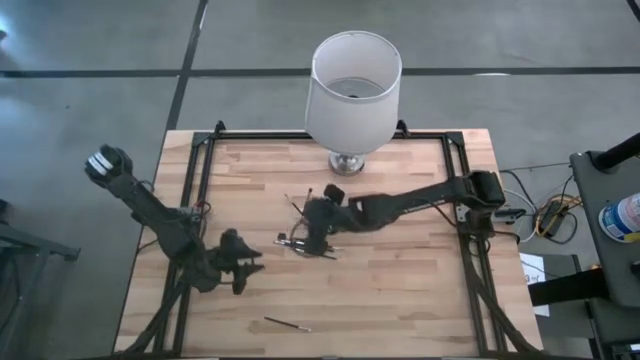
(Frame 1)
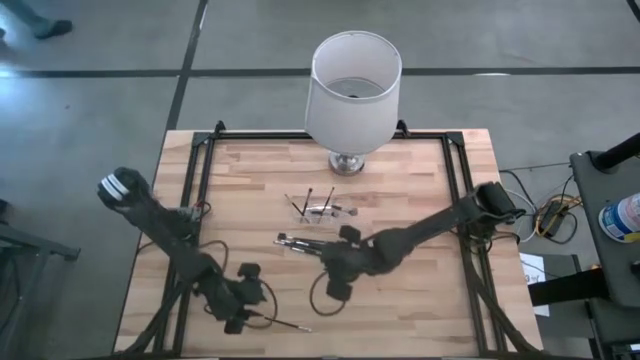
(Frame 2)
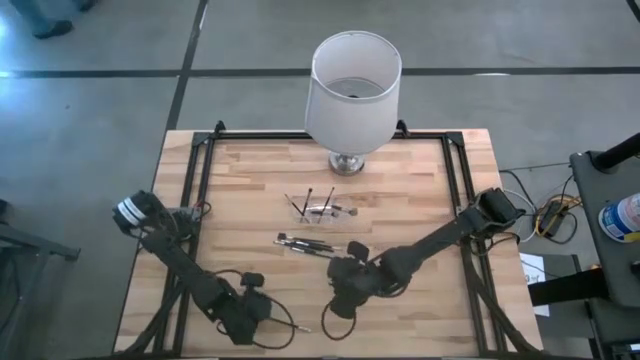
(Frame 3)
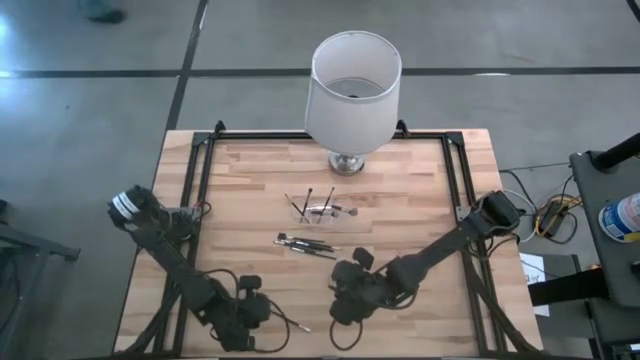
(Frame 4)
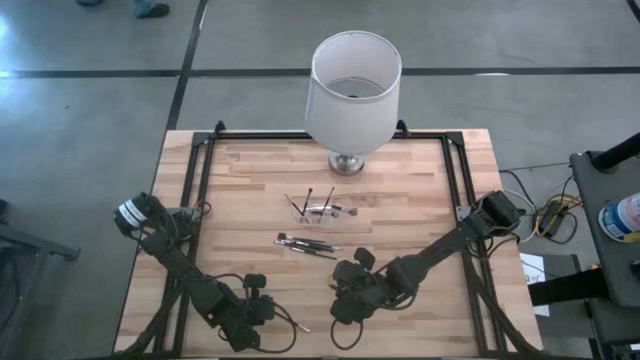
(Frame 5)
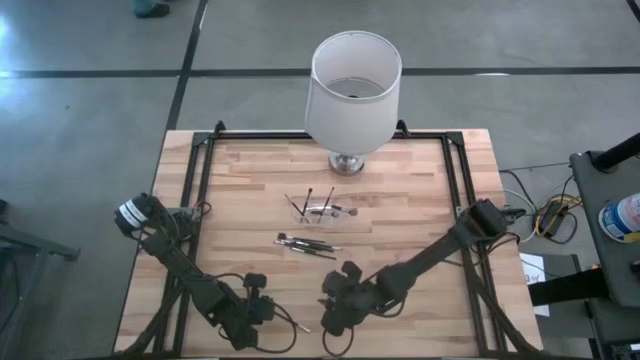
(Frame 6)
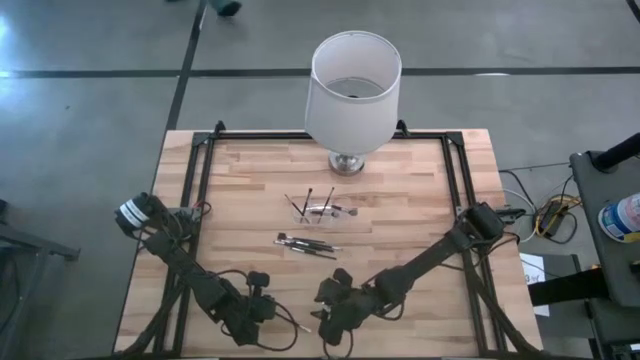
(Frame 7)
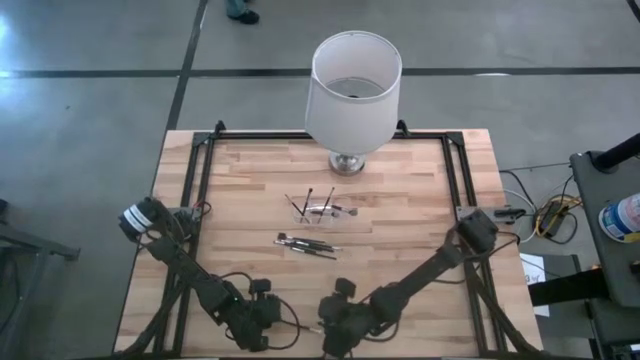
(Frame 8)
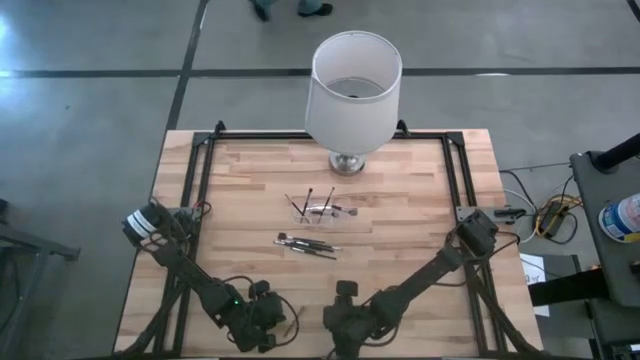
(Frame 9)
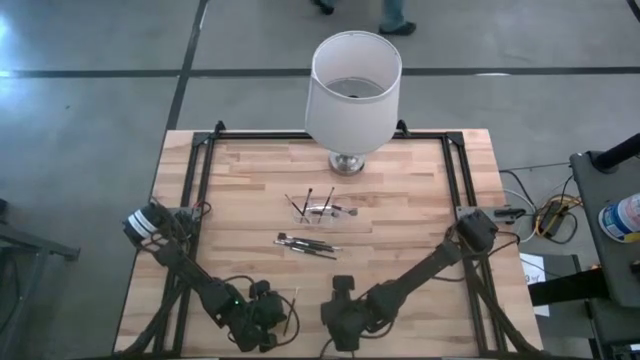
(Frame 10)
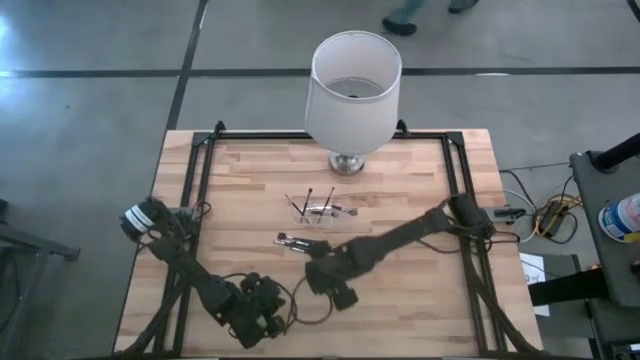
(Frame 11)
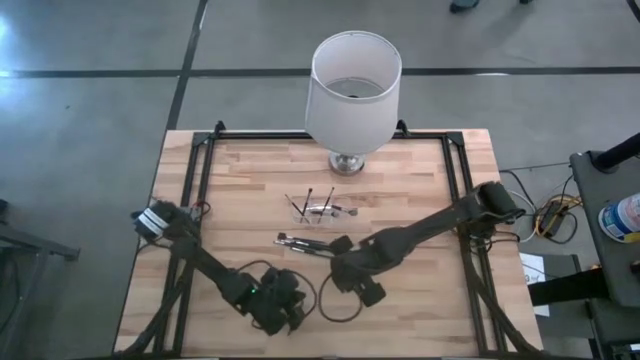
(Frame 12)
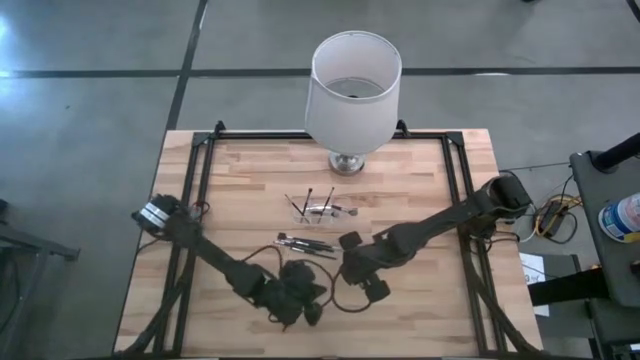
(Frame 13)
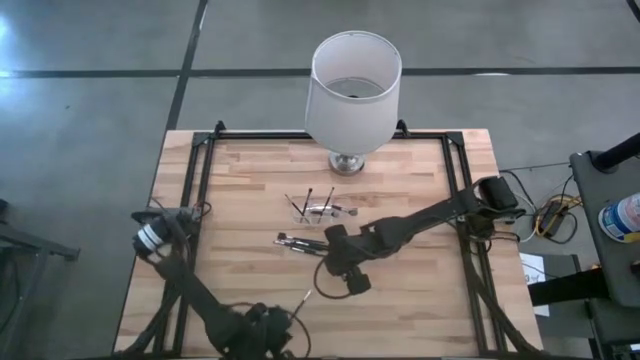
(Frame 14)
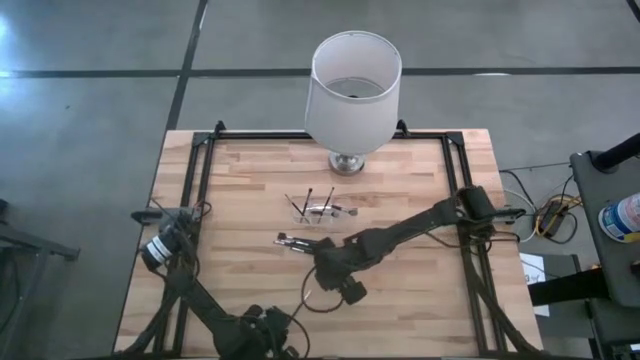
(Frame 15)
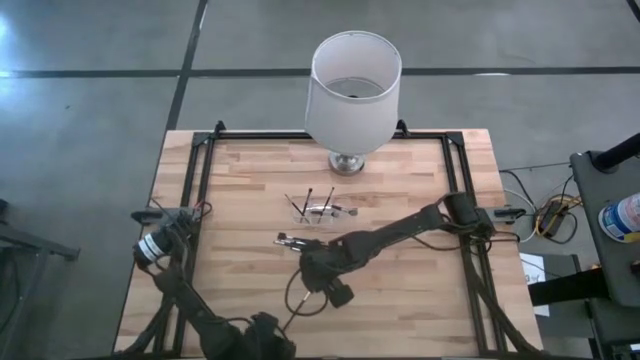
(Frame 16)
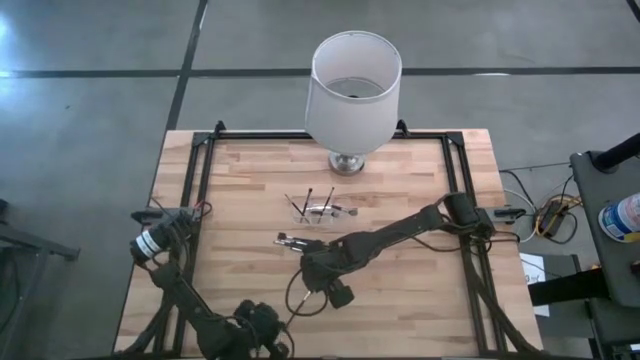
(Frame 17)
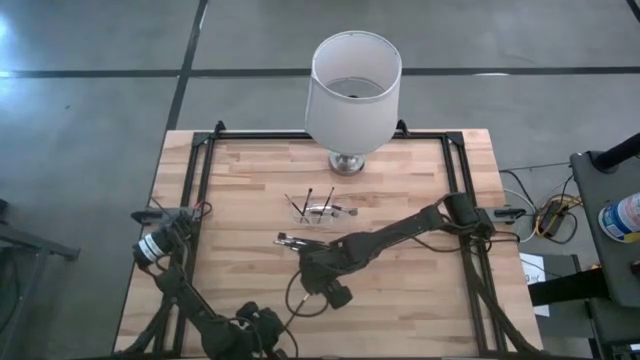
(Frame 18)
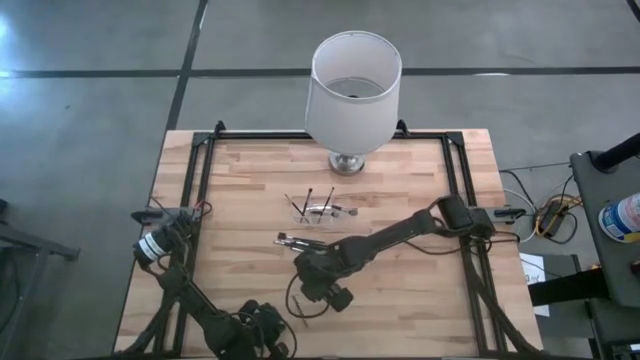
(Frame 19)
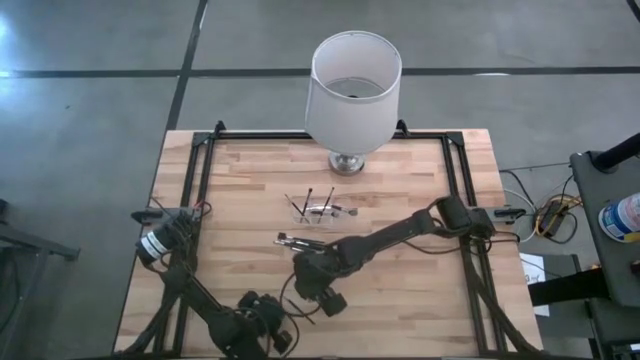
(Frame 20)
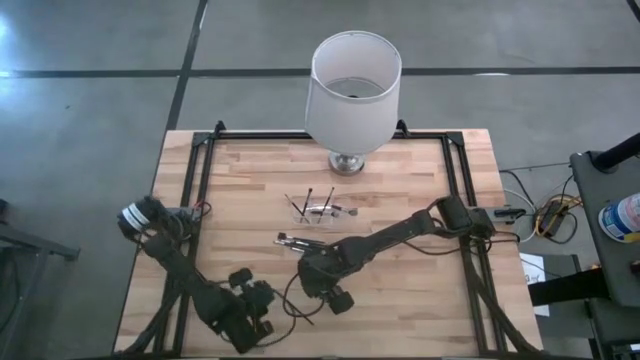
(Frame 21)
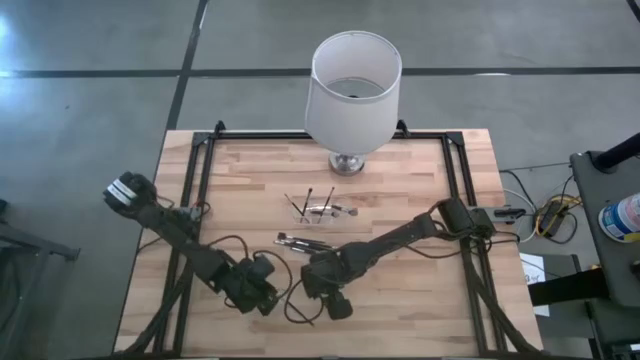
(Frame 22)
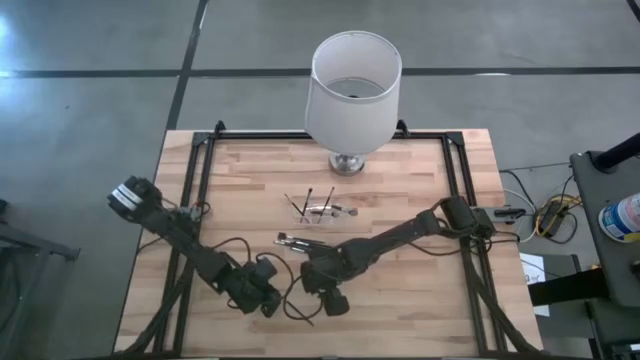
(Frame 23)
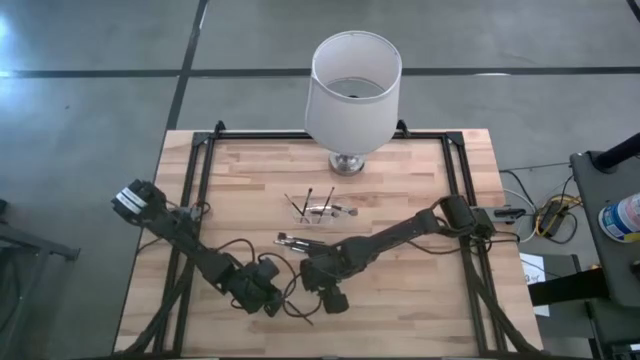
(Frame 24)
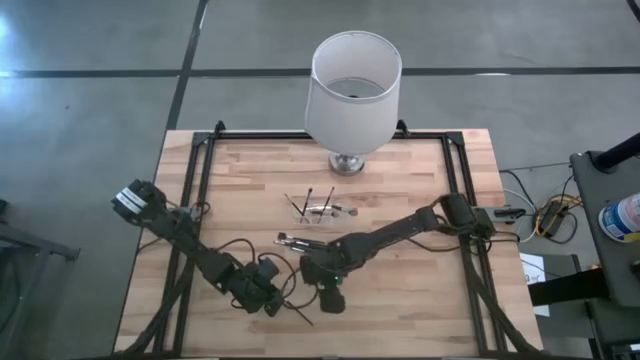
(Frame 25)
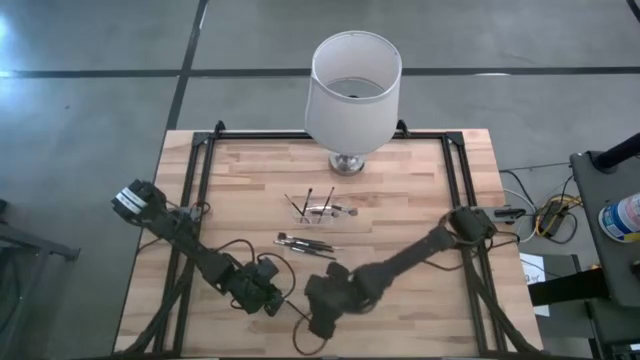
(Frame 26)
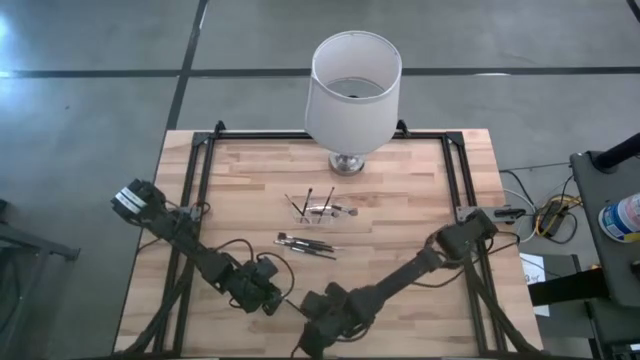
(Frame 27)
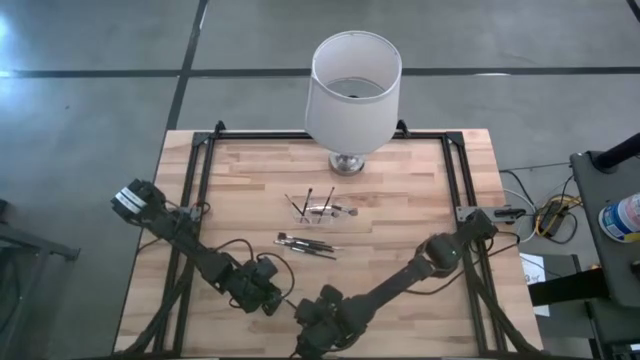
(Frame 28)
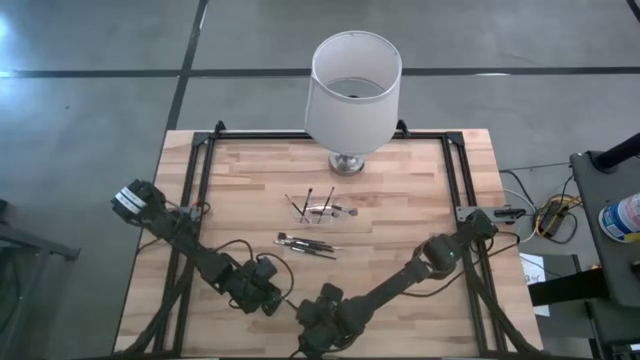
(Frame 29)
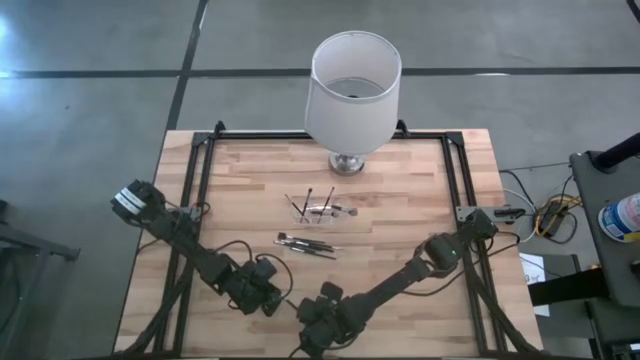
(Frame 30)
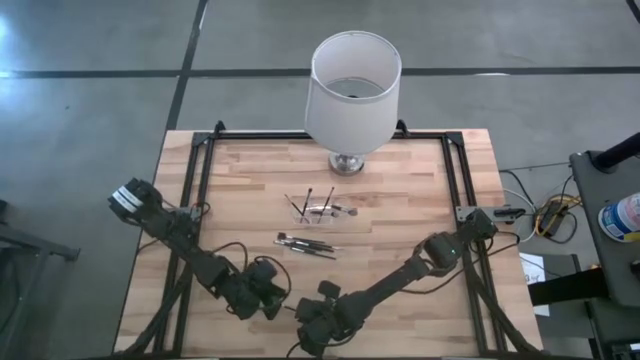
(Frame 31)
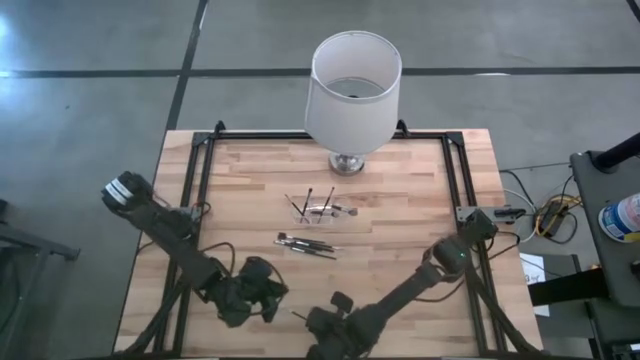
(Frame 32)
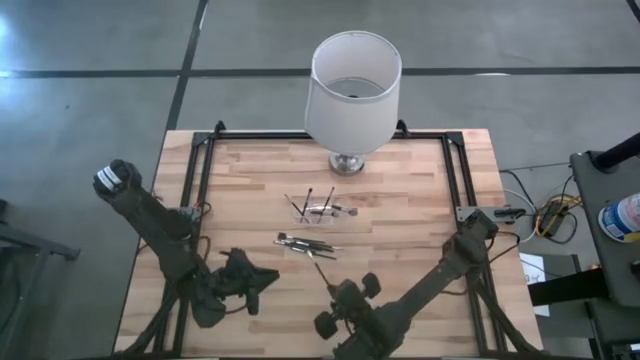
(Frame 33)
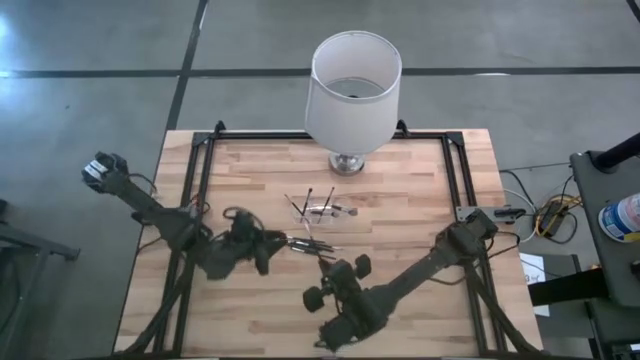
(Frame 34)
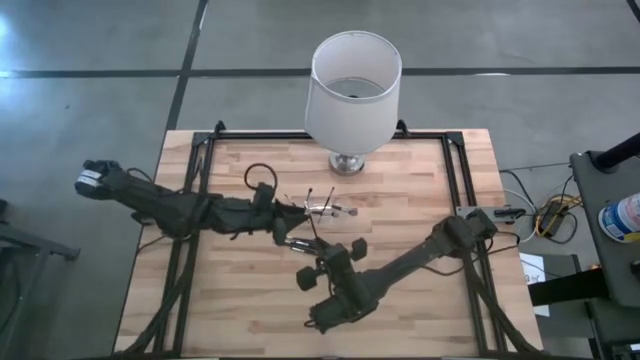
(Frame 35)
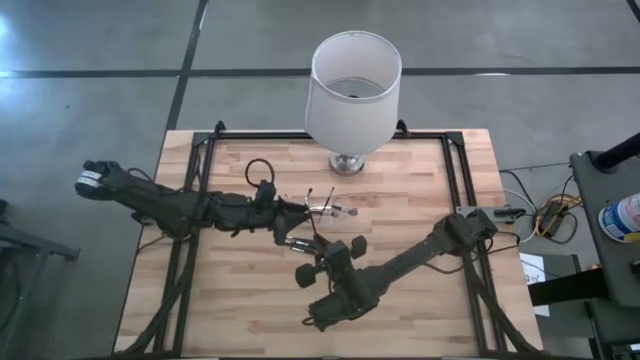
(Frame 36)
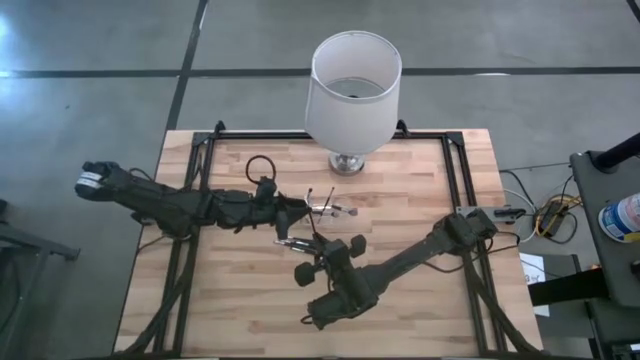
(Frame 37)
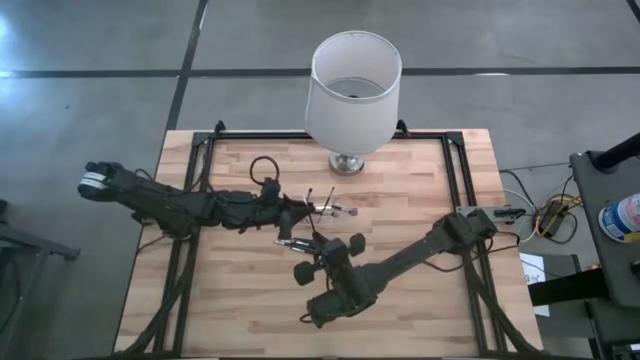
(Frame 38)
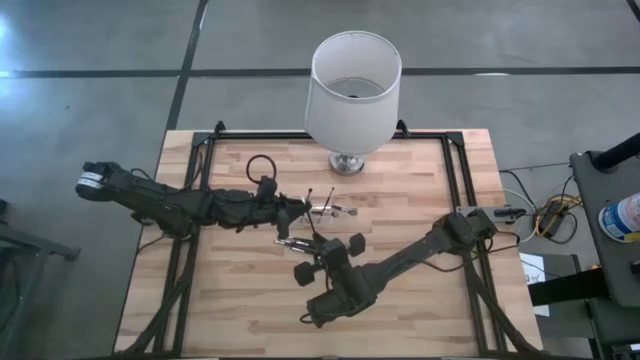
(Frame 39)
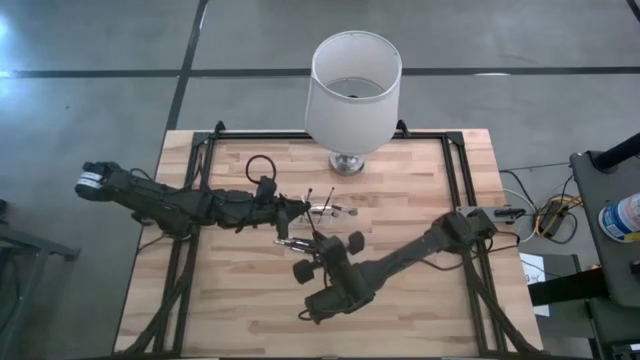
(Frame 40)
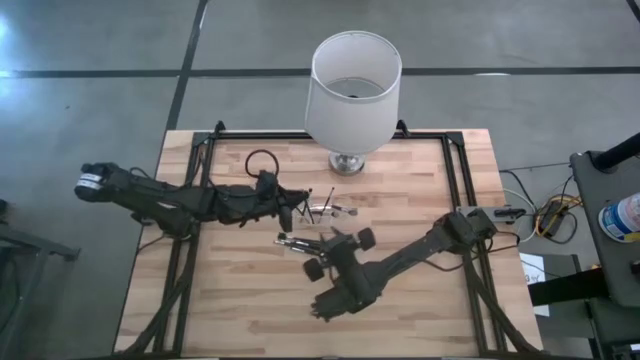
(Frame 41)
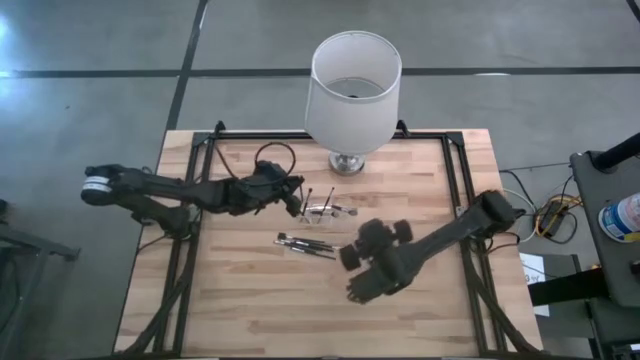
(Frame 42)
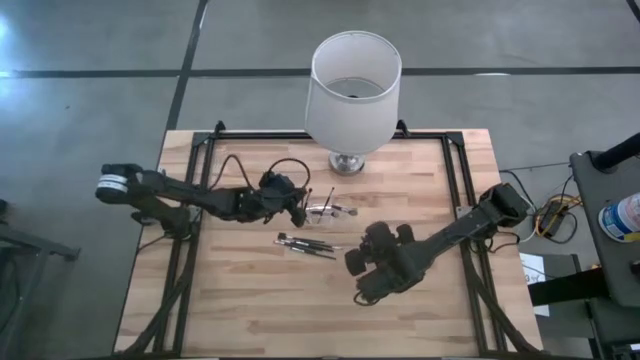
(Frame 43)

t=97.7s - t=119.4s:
Task: Put items in baskets/containers
Put the eyeshadow brush into the transparent organizer
